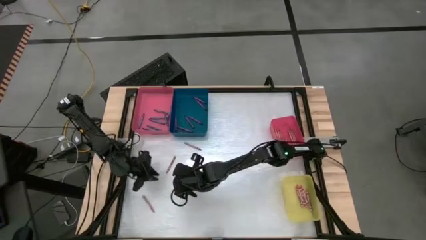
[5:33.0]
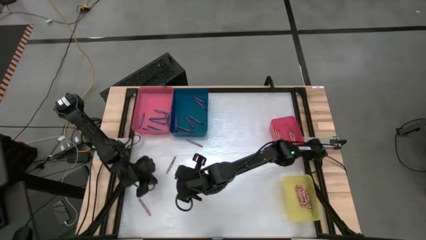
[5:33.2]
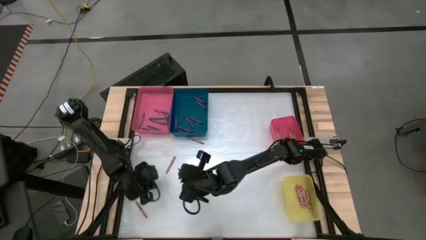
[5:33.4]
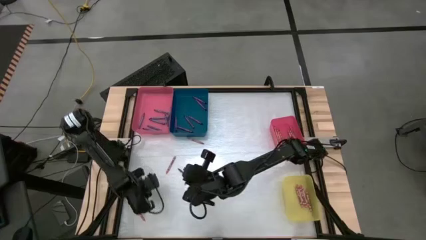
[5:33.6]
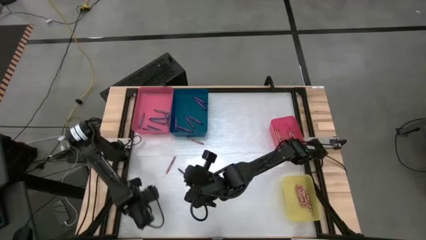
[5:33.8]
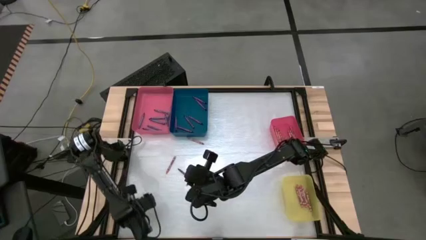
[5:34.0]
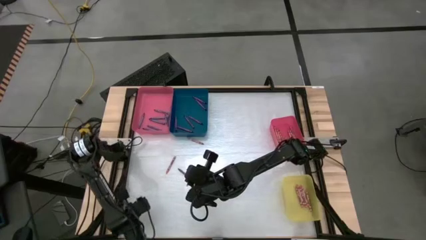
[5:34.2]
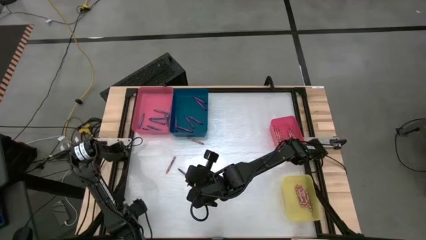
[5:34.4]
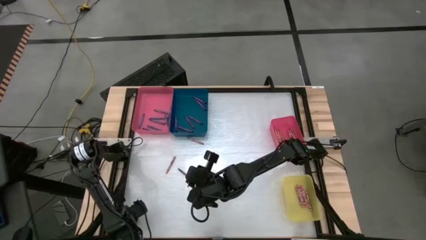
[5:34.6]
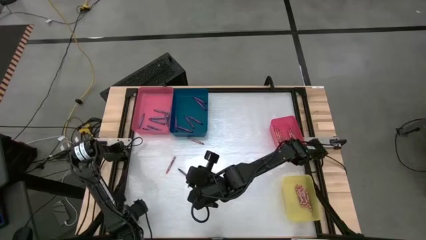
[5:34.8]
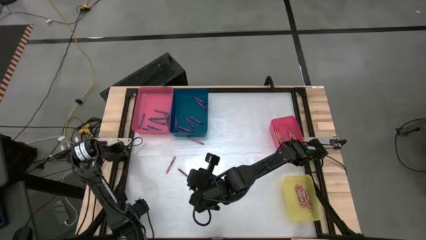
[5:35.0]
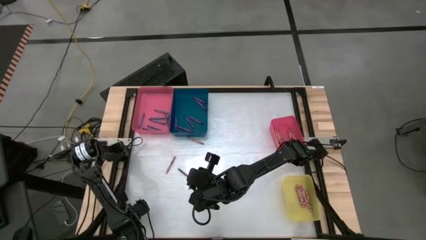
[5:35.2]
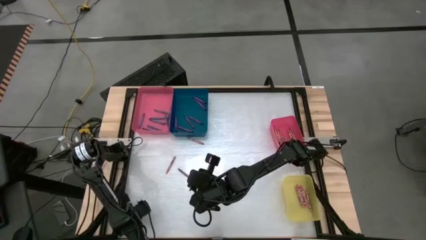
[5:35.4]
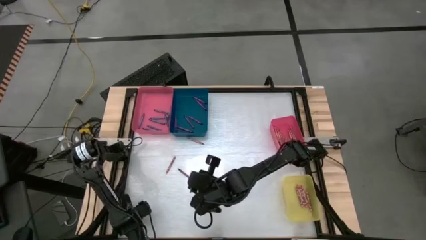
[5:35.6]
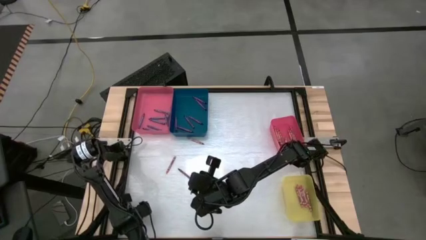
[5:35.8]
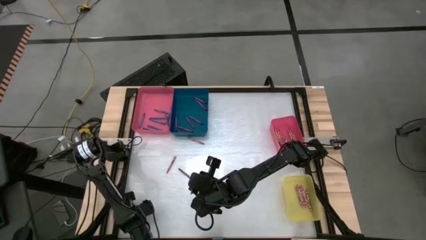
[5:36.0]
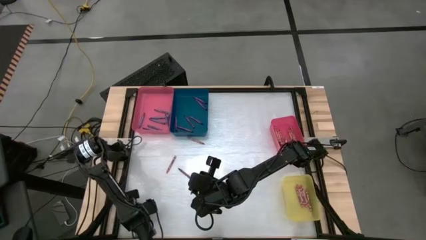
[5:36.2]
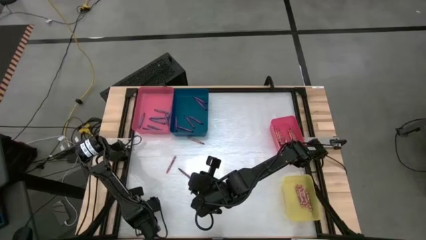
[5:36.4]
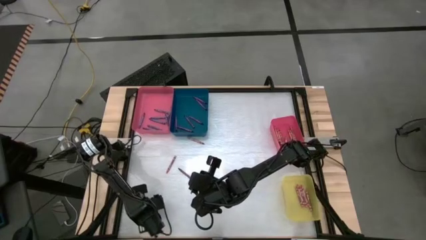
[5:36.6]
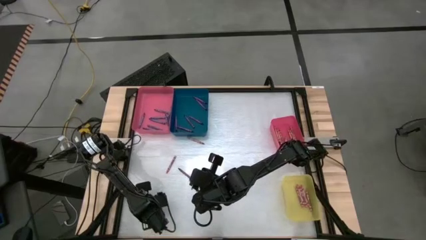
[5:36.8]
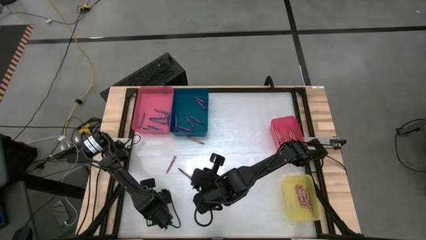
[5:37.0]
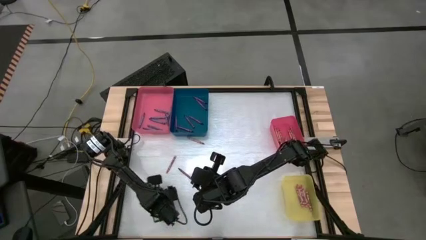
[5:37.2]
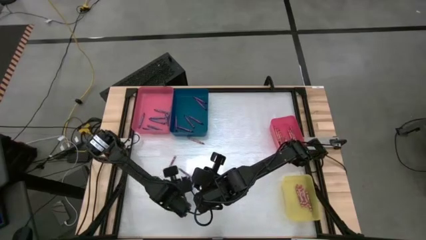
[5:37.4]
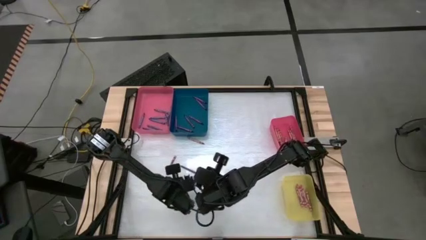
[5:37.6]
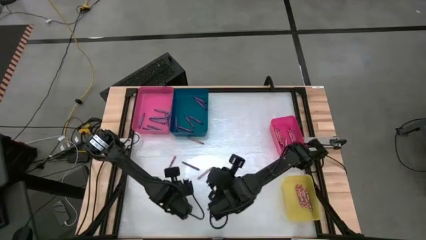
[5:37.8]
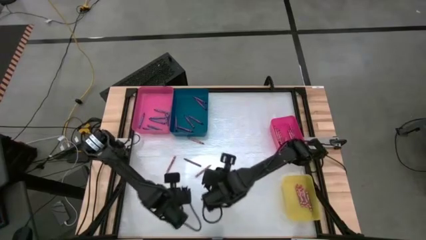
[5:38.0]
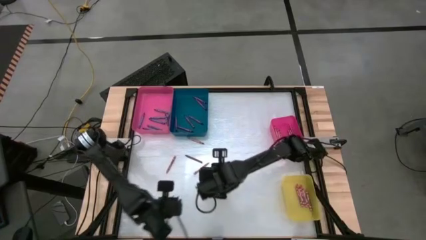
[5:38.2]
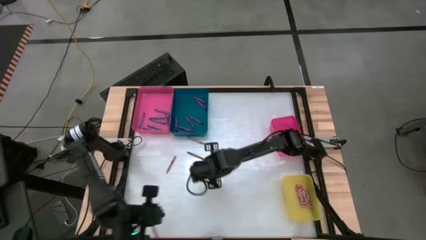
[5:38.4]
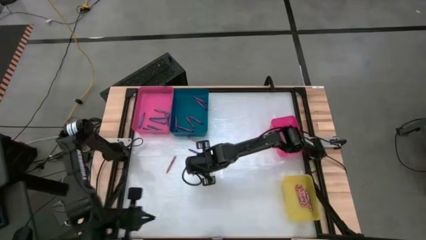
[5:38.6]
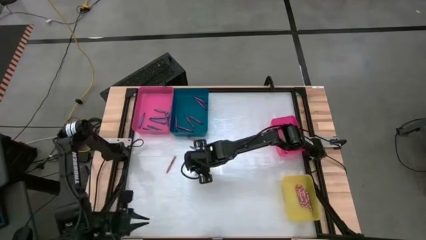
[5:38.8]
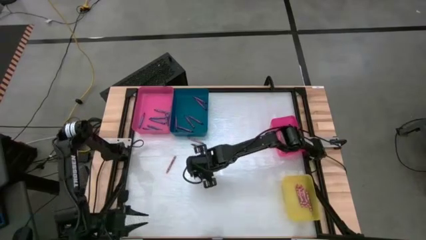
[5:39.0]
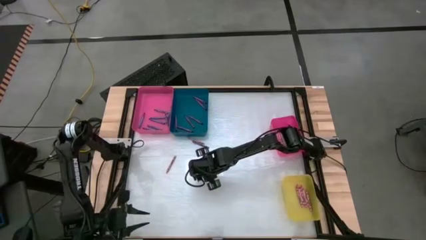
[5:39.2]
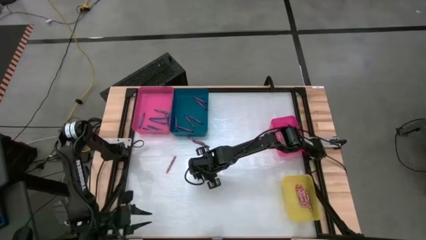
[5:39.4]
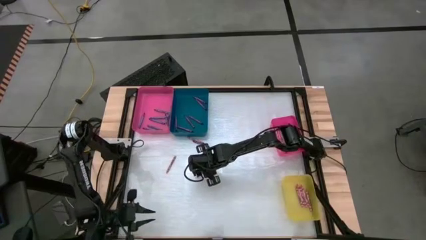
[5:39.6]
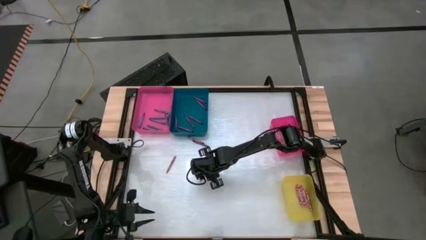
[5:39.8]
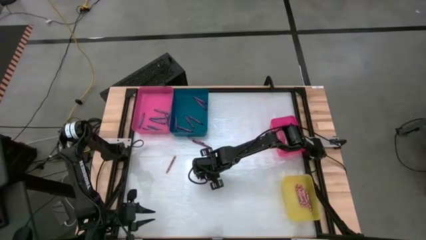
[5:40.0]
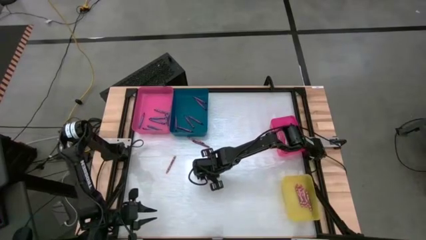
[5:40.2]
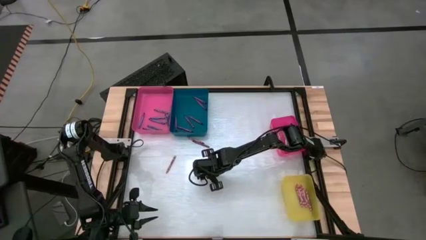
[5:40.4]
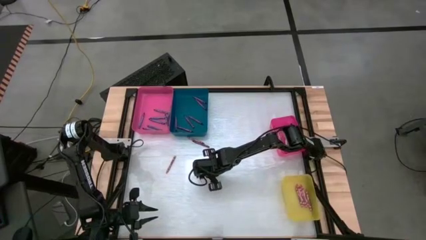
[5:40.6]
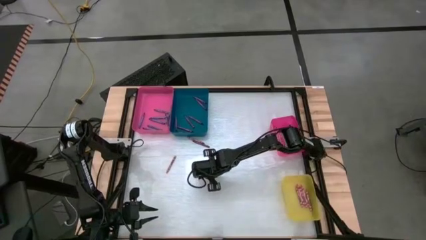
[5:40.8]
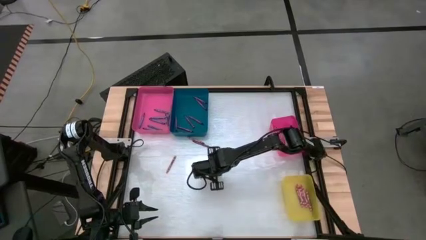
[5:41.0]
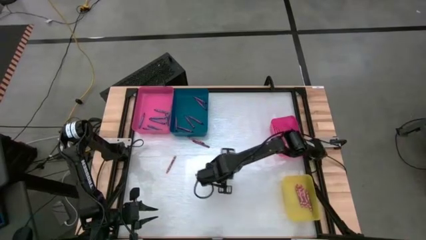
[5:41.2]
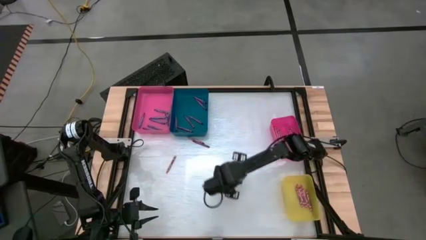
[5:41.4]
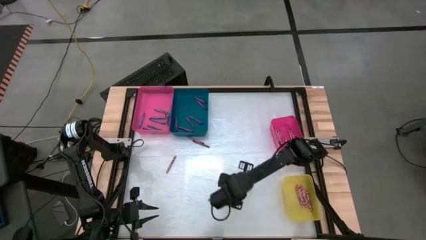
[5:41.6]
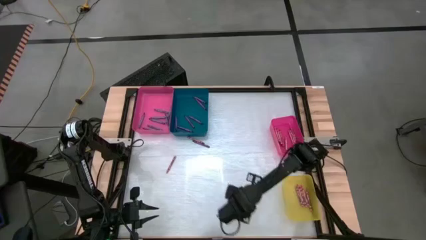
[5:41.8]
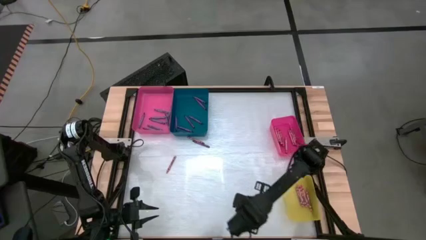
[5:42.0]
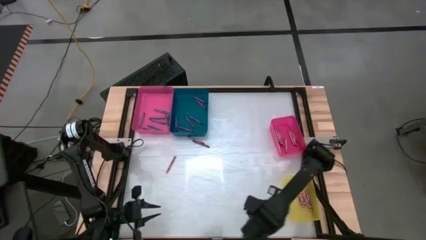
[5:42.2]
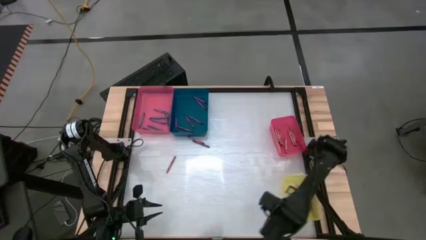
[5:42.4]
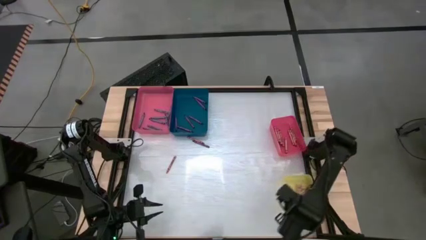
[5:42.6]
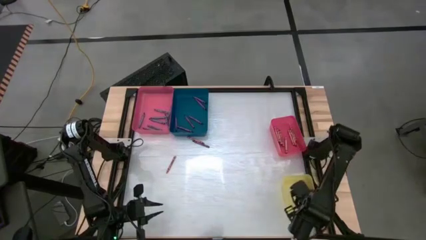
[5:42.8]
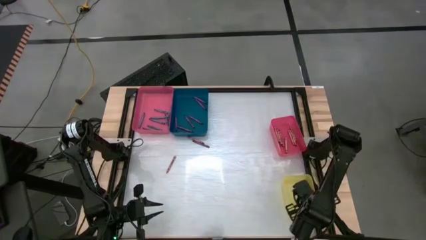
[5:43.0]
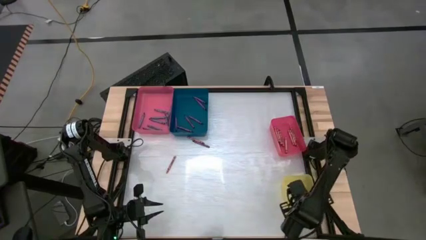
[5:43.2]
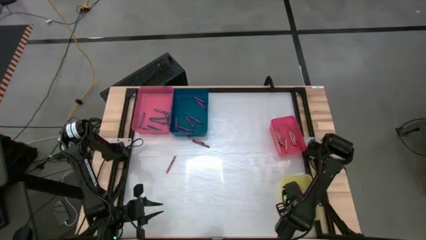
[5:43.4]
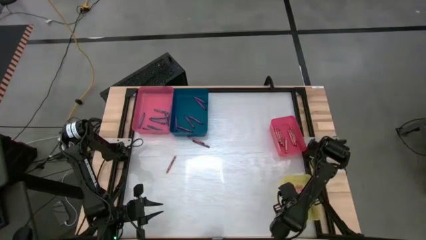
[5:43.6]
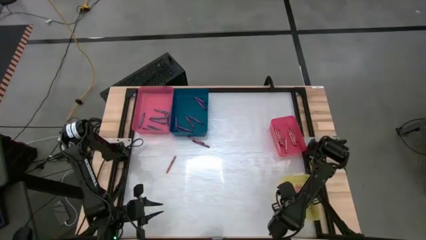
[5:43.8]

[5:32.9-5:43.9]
Task: Sort crayons
Put the pink crayon into the yellow bin

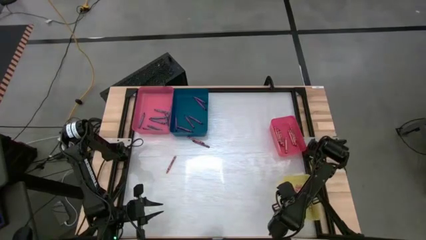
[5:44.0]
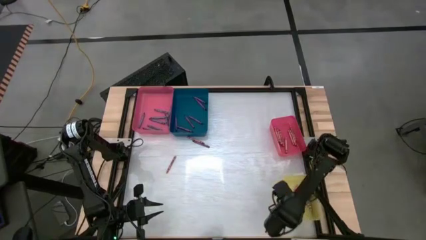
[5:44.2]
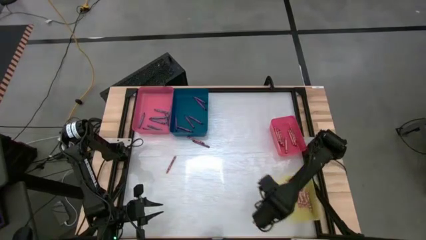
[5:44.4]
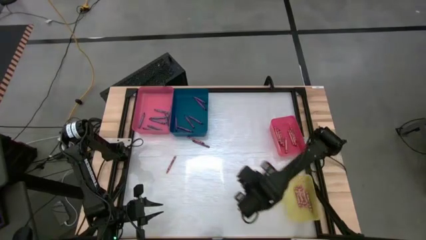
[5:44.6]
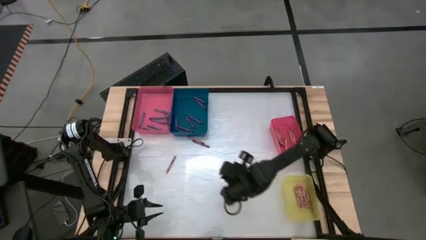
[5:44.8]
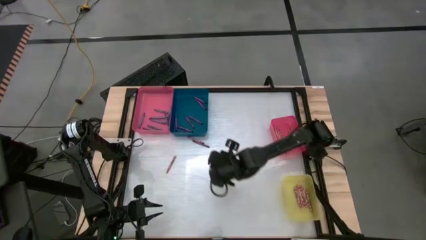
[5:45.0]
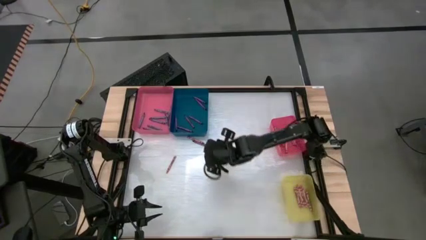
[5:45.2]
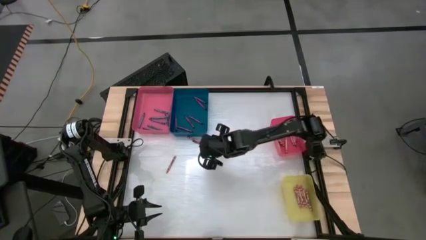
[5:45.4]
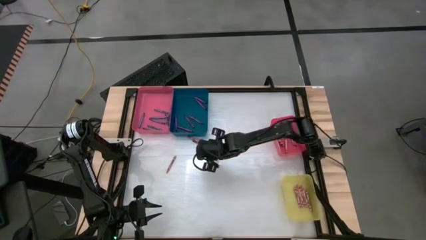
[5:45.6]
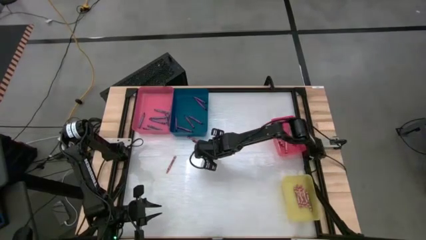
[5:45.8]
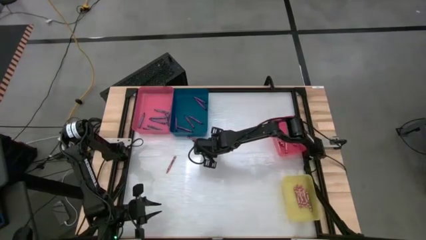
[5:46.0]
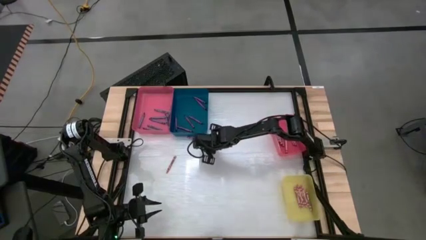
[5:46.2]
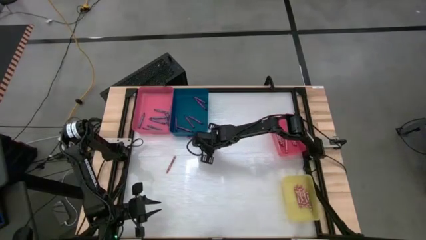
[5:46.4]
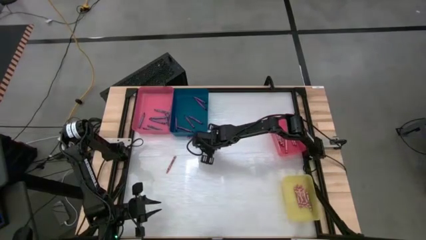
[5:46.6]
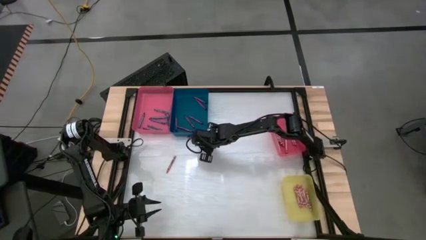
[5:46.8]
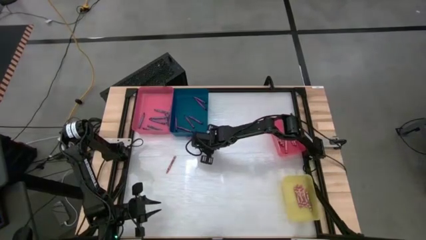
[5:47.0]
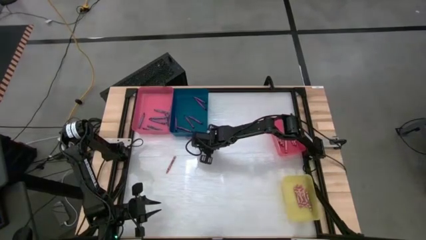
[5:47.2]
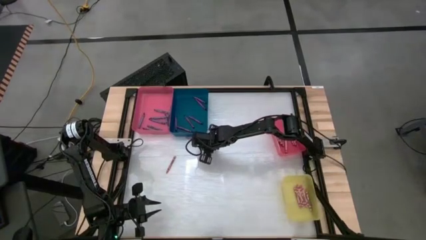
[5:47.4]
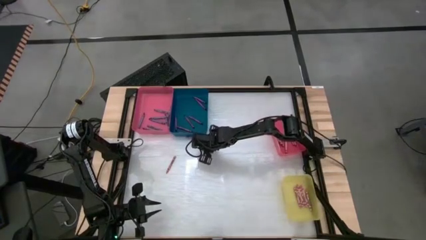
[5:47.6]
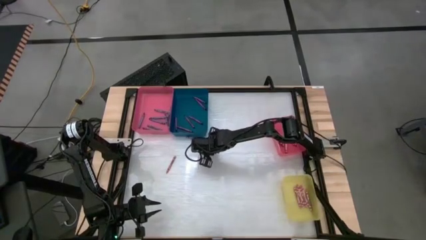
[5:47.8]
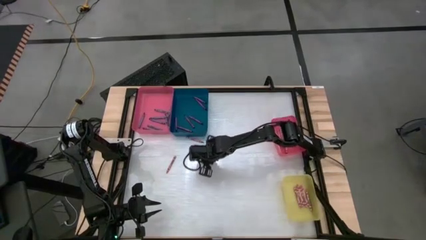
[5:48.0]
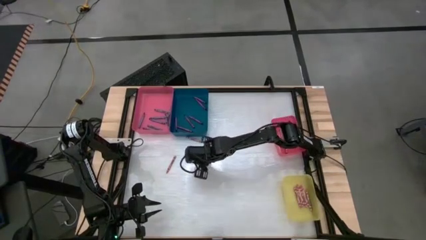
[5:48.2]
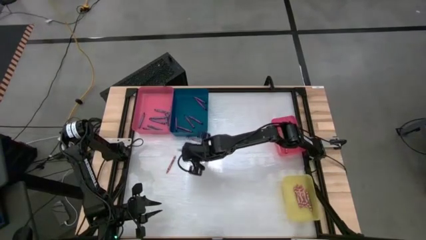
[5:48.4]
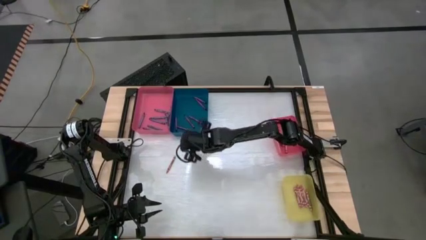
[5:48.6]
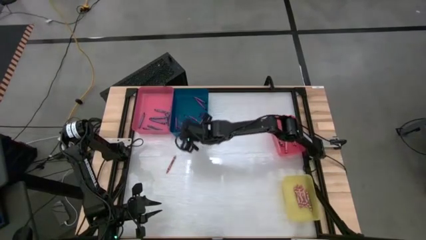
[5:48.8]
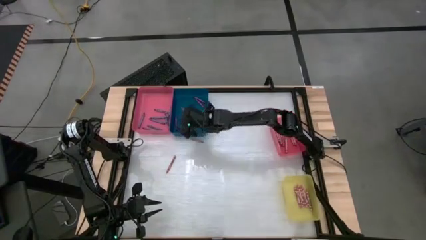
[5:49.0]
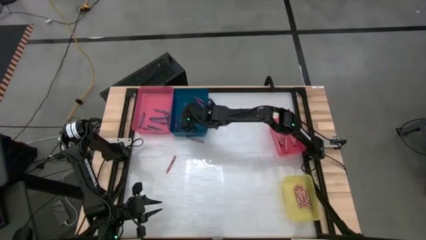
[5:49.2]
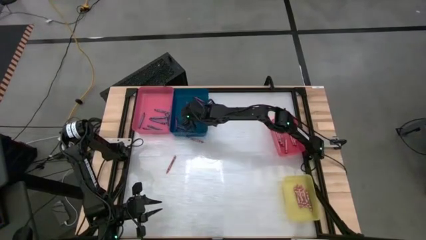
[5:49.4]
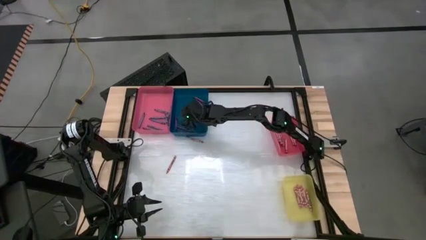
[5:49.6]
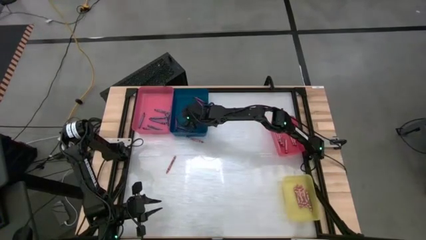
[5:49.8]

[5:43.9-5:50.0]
Put the purple crayon into the blue bin
